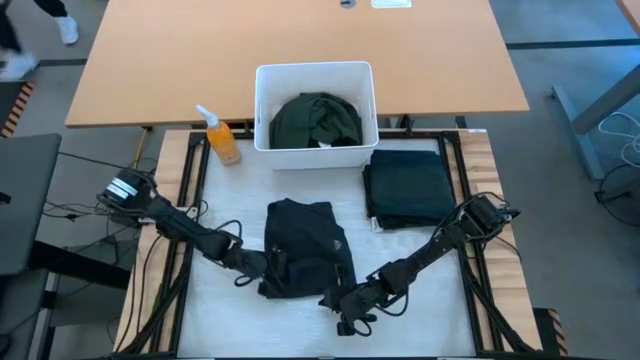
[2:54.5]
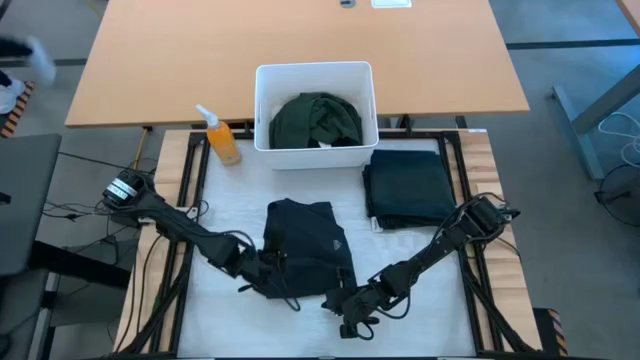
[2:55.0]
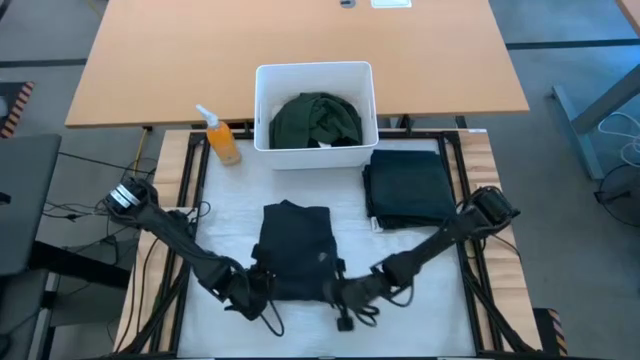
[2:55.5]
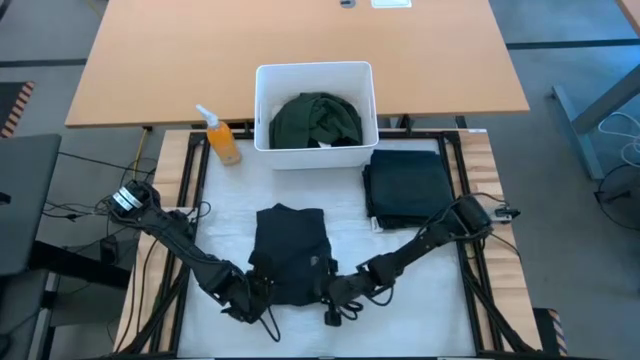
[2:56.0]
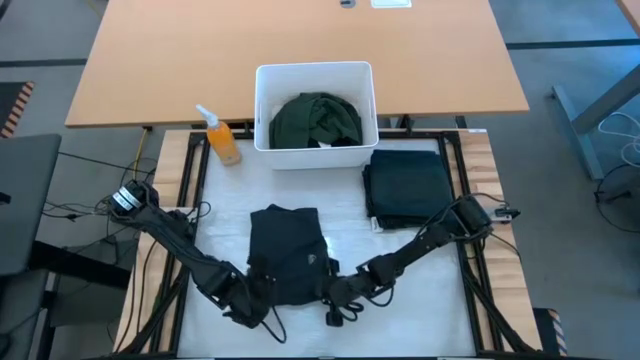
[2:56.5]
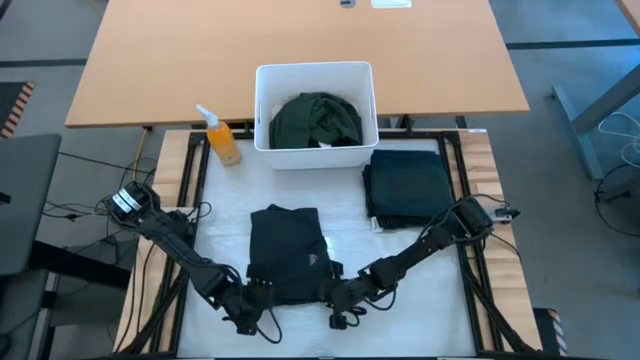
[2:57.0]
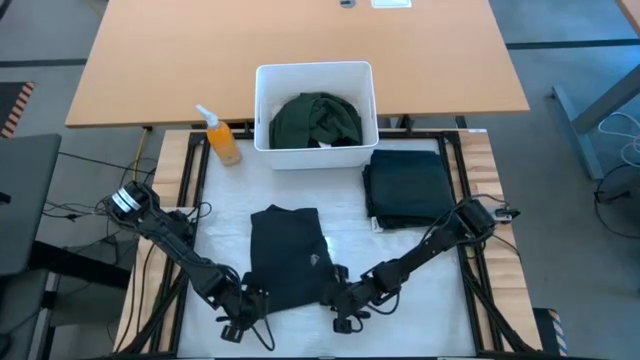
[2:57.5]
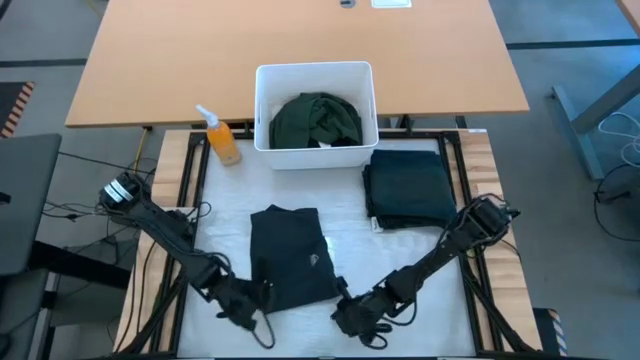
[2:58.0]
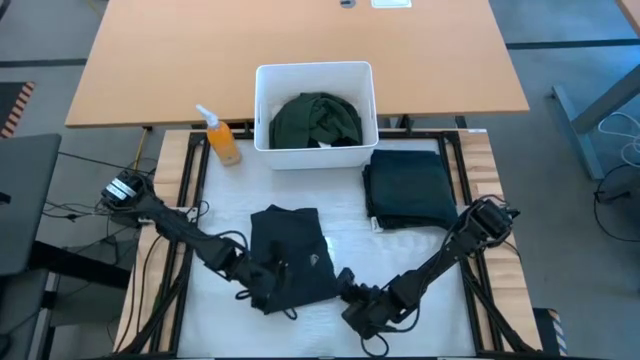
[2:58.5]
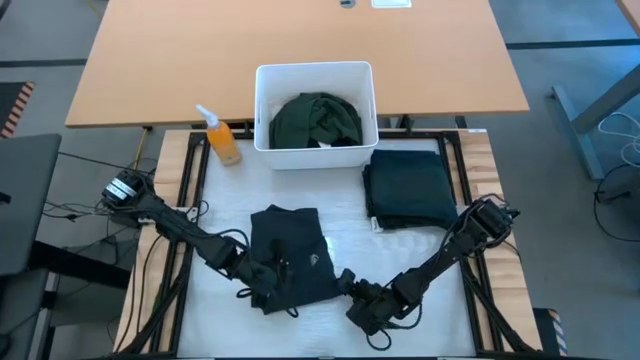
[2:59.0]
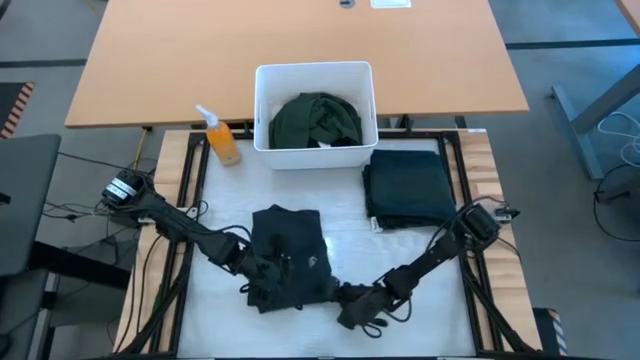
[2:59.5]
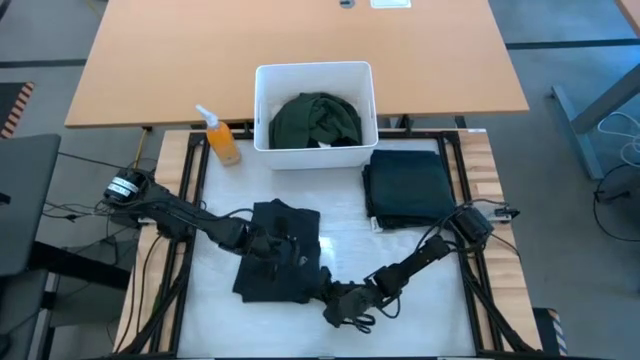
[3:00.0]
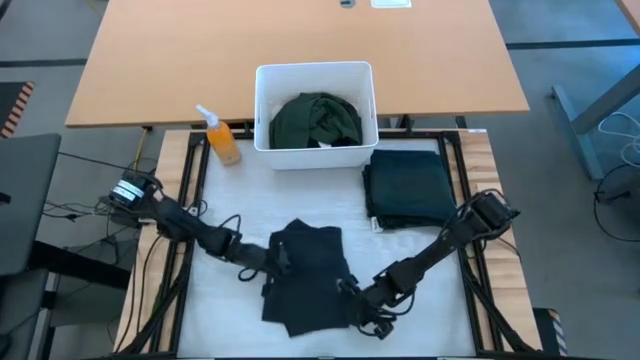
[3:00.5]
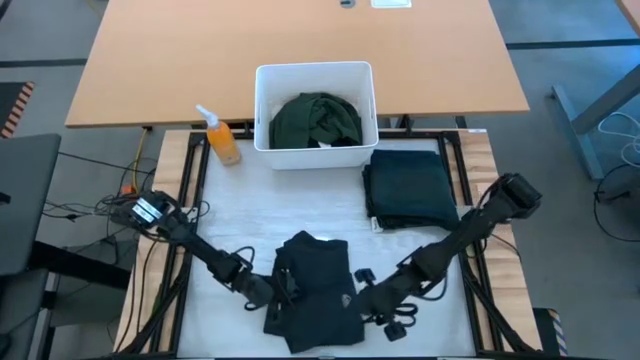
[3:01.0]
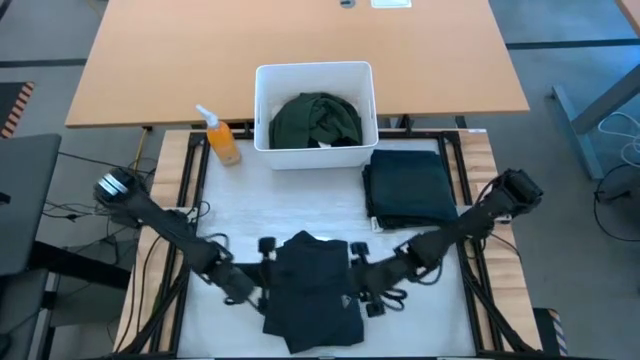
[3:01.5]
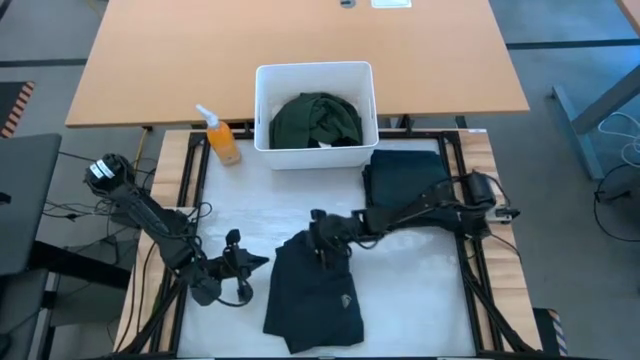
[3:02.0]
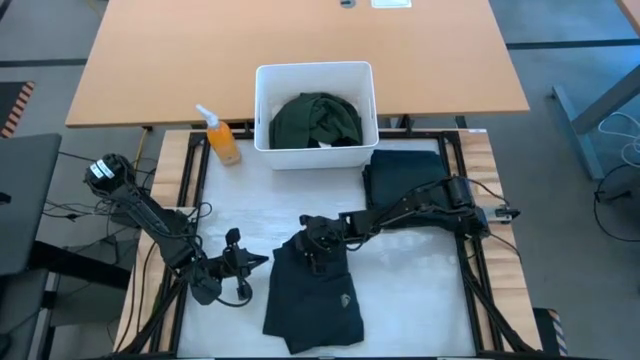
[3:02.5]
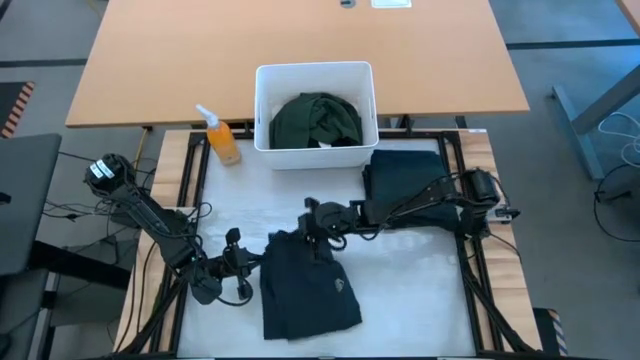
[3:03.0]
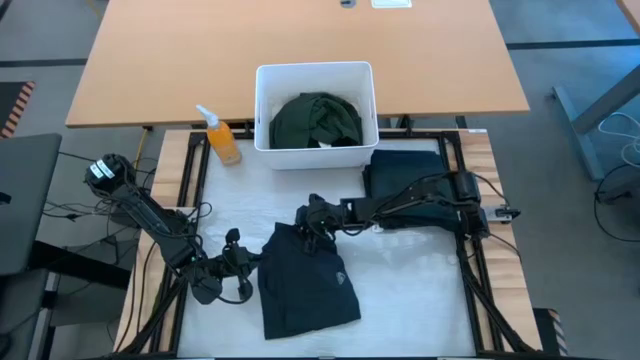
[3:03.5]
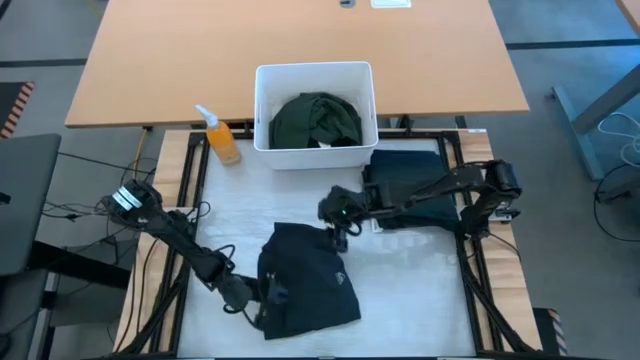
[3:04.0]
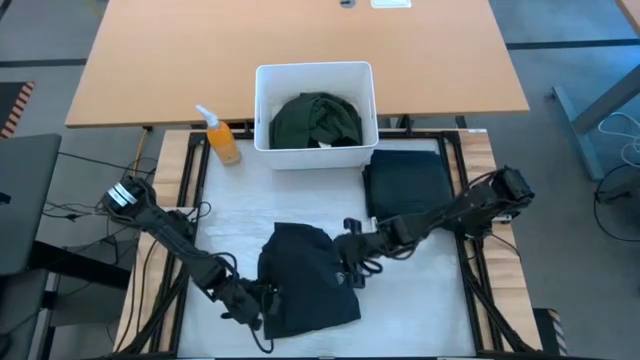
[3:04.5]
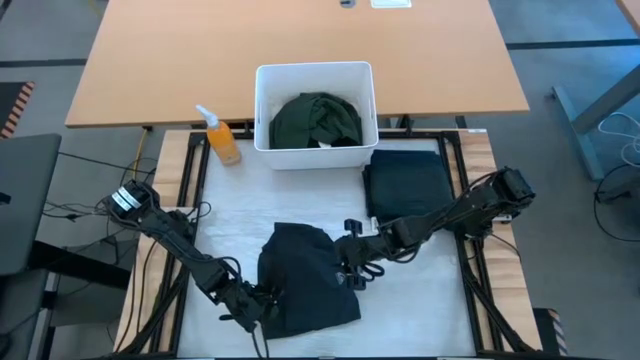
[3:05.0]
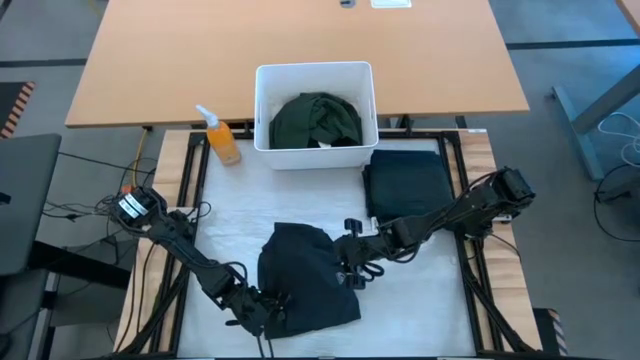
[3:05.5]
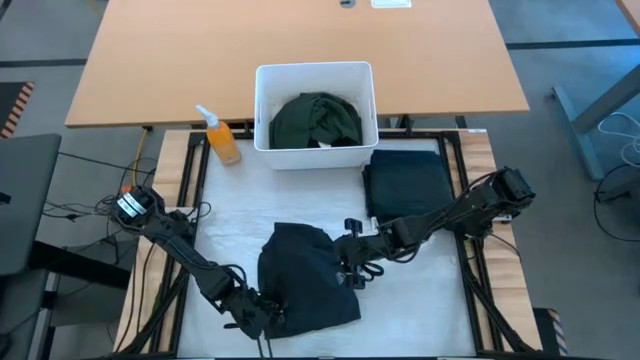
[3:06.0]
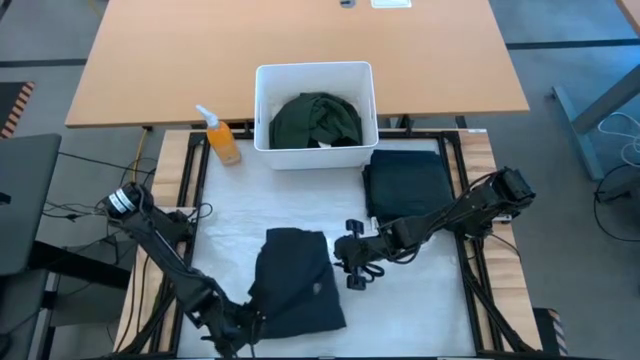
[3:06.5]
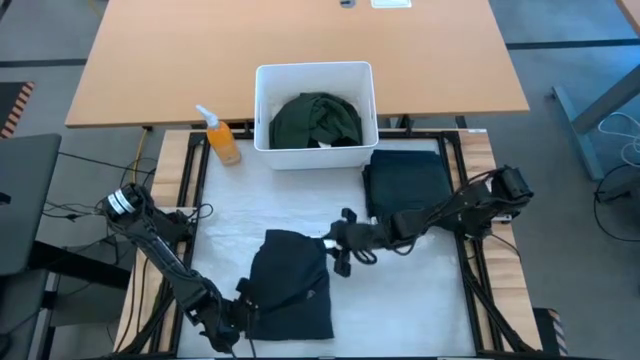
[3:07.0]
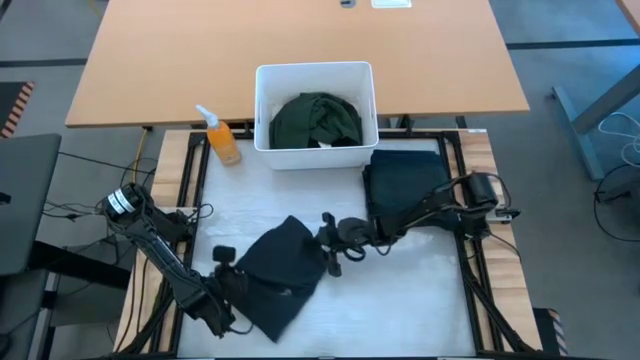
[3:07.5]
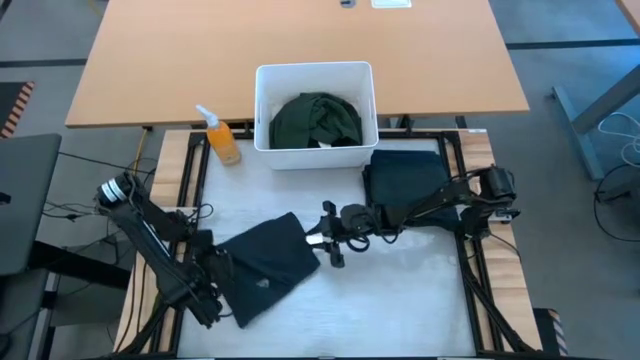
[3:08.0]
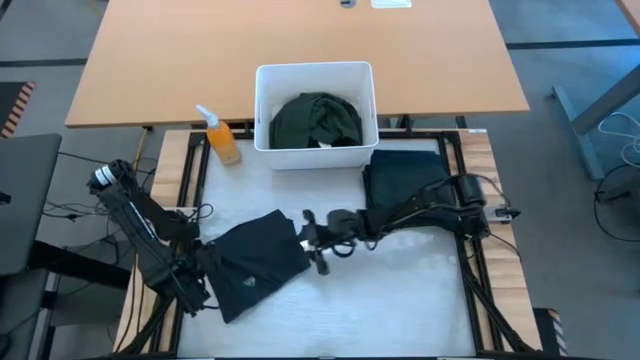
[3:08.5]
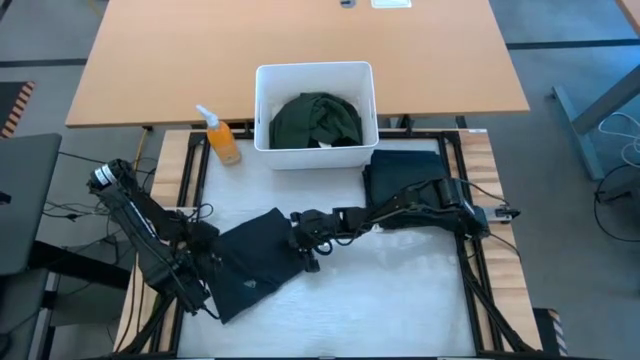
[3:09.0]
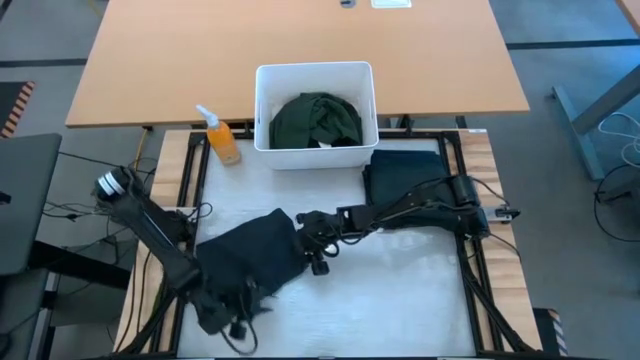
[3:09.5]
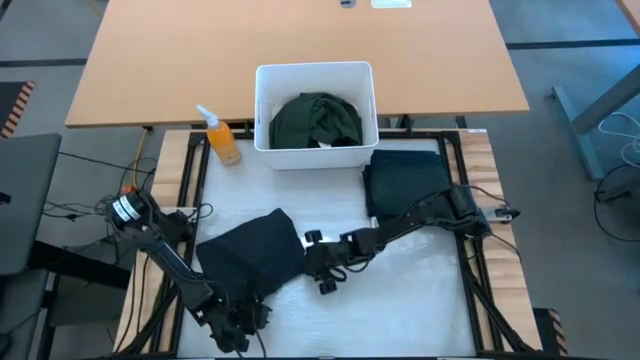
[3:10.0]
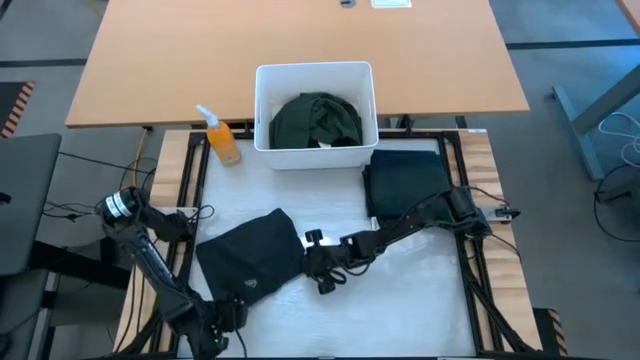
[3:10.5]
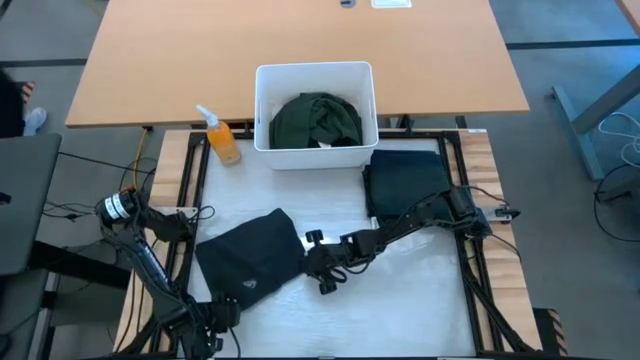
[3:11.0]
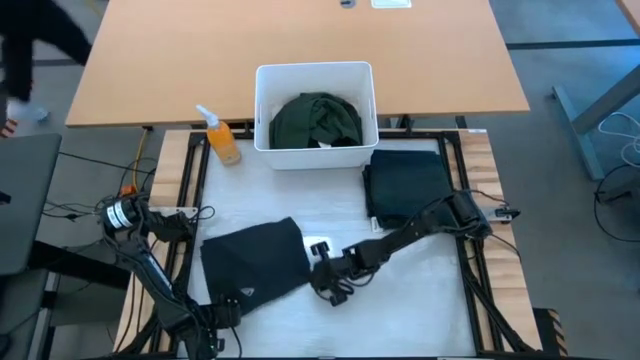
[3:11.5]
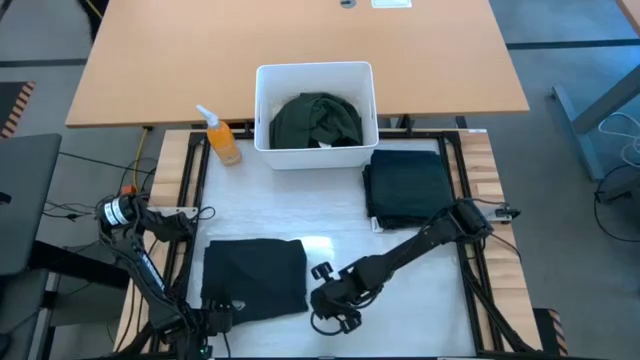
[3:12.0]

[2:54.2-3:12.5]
Task: Fold laundry
Fold the black shorts from the white laundry organizer

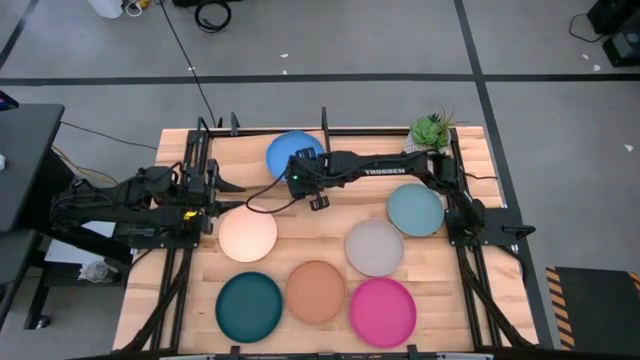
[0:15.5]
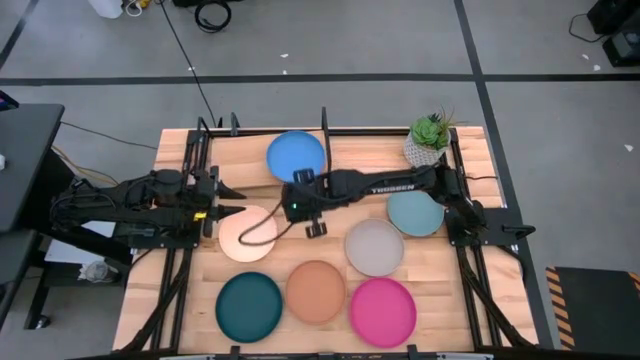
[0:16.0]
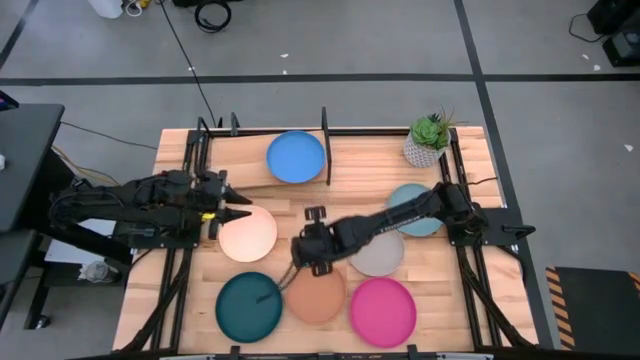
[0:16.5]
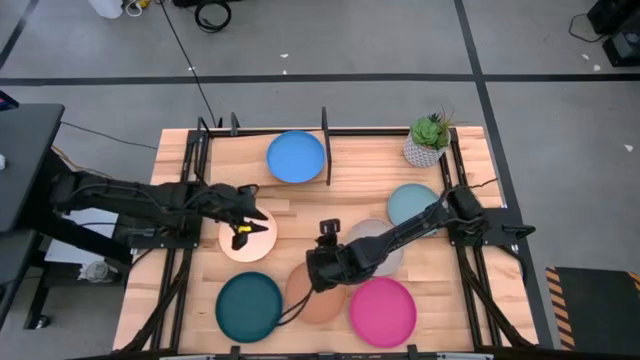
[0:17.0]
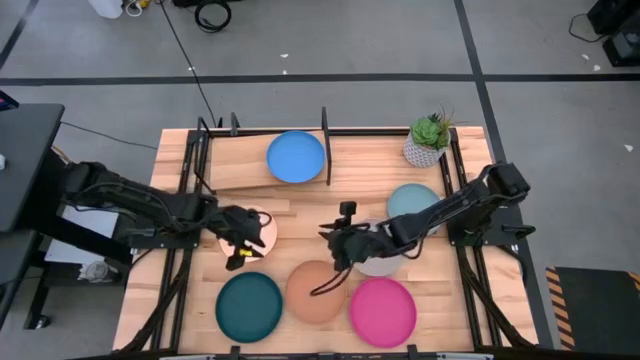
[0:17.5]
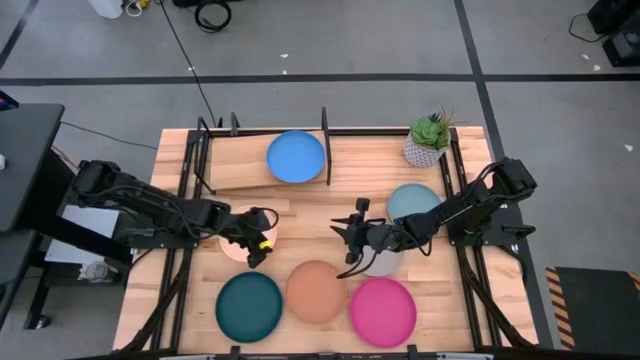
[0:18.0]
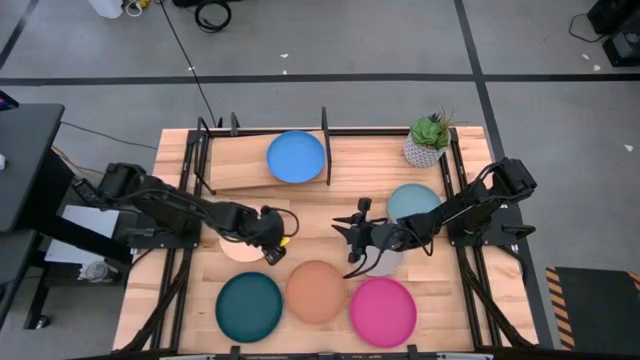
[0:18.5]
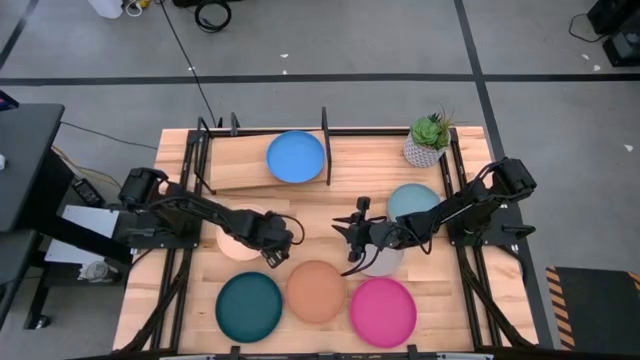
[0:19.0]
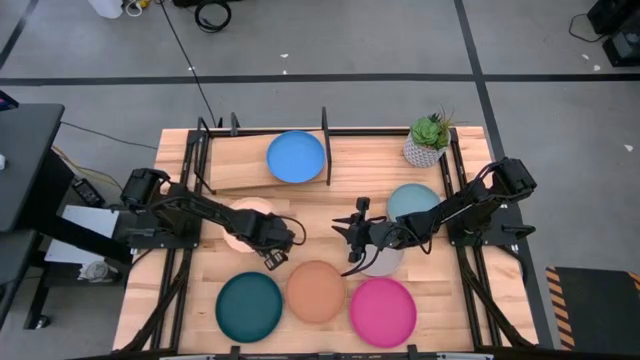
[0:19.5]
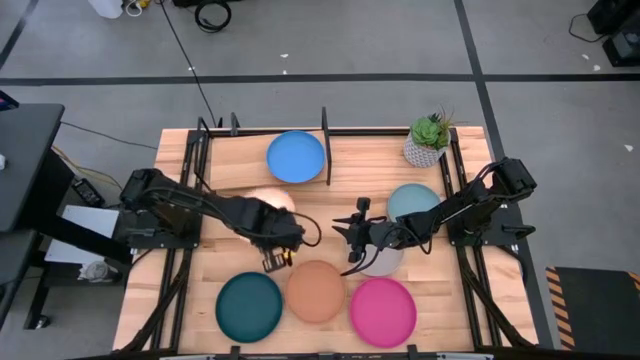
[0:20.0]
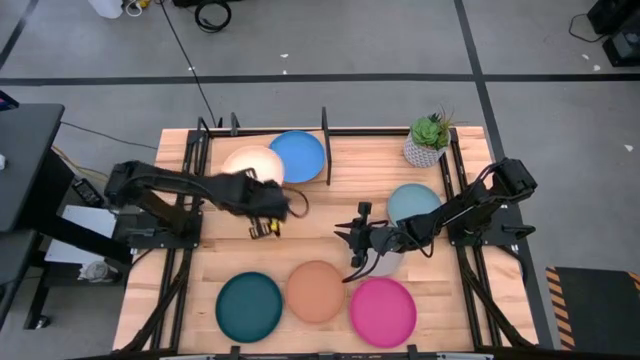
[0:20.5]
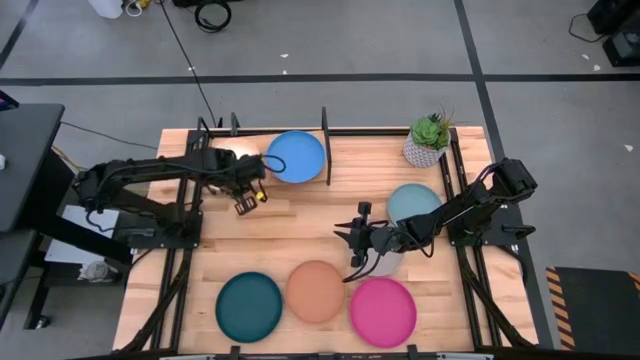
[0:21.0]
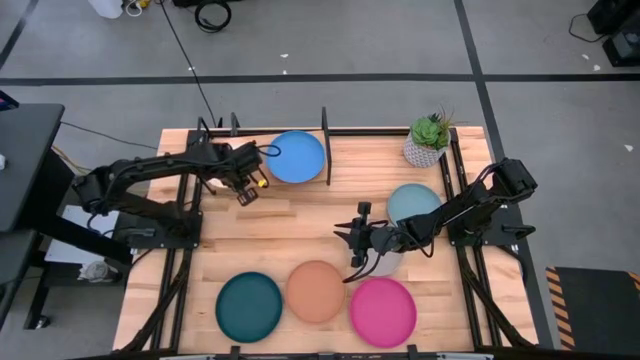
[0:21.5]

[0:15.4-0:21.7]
Task: Place and stack plates onto a shelf
Put the light pink plate on the shelf
